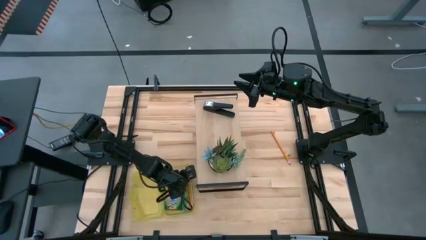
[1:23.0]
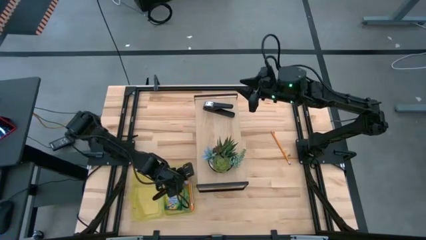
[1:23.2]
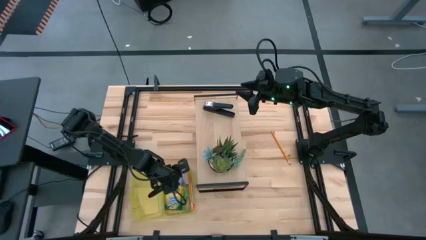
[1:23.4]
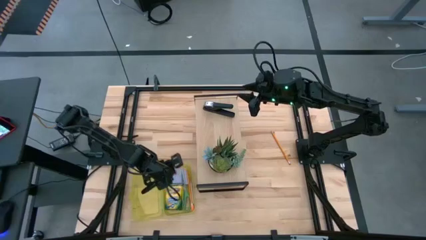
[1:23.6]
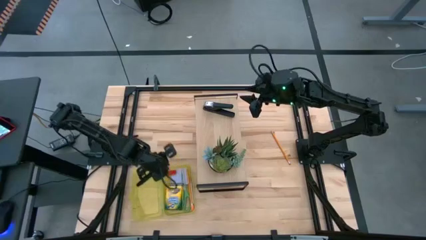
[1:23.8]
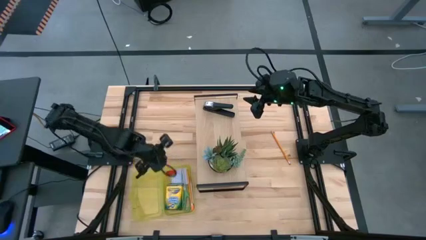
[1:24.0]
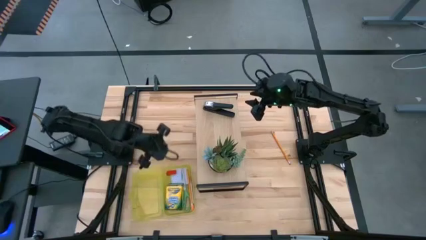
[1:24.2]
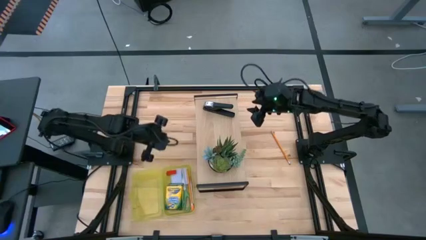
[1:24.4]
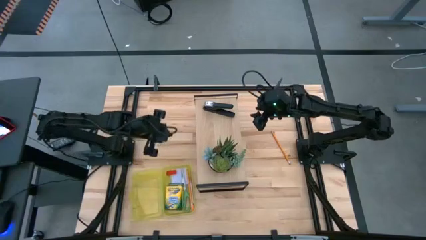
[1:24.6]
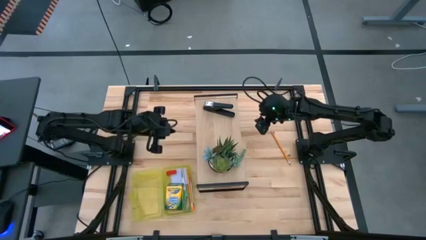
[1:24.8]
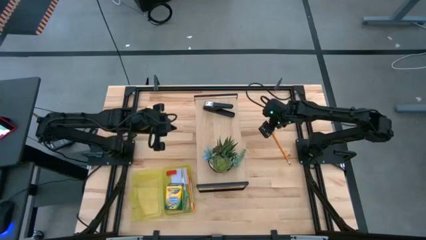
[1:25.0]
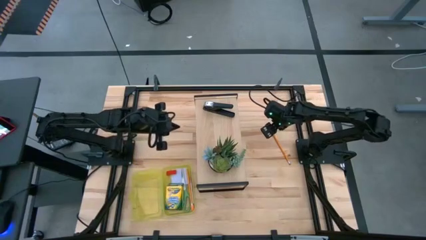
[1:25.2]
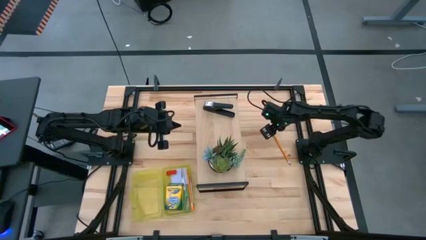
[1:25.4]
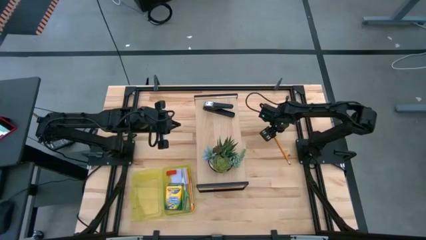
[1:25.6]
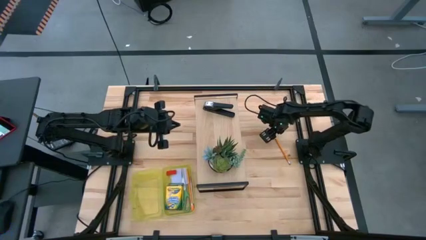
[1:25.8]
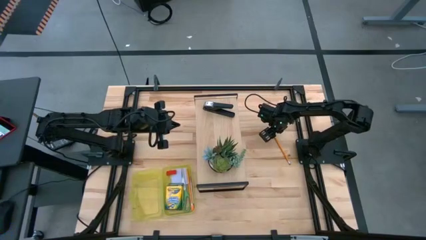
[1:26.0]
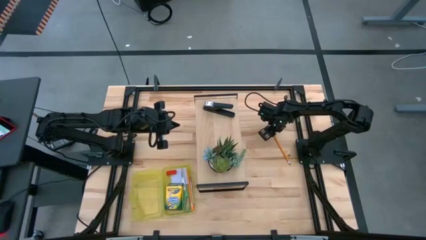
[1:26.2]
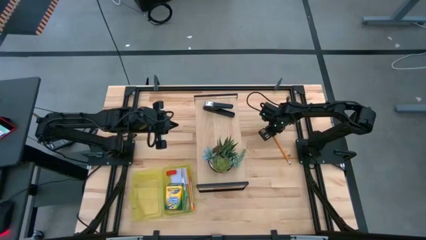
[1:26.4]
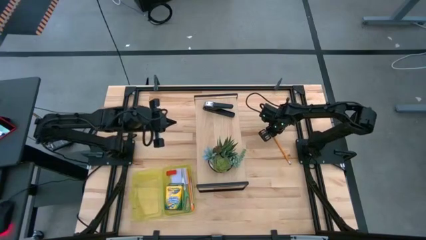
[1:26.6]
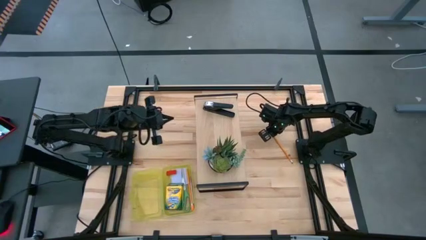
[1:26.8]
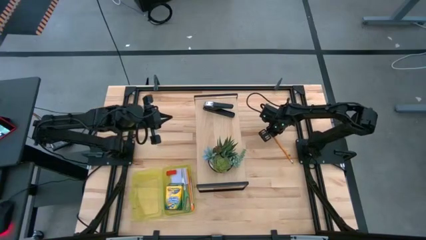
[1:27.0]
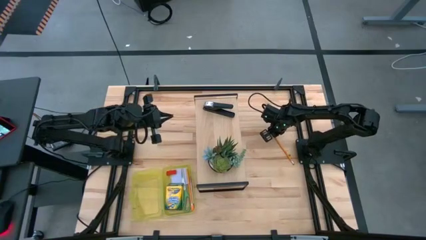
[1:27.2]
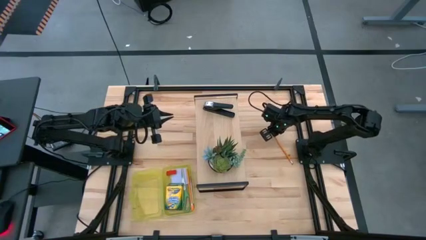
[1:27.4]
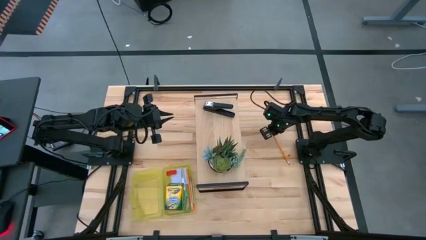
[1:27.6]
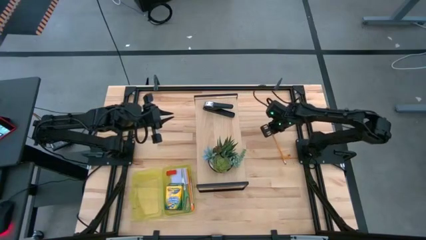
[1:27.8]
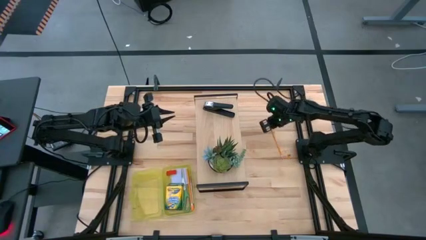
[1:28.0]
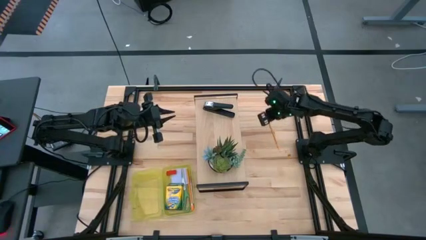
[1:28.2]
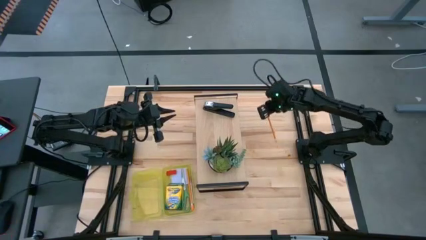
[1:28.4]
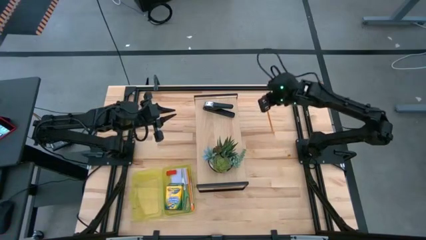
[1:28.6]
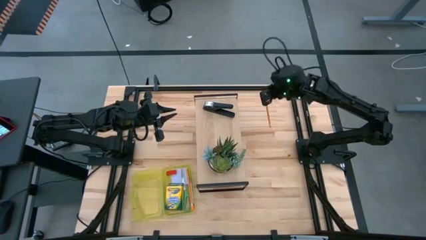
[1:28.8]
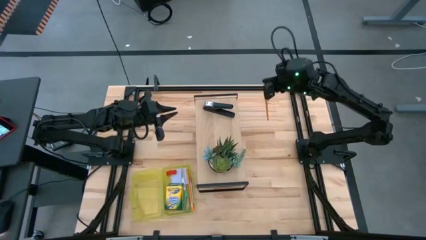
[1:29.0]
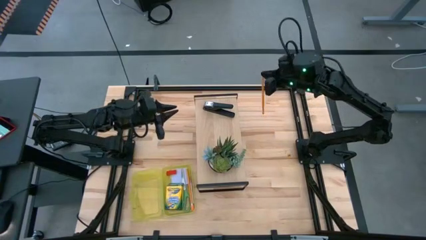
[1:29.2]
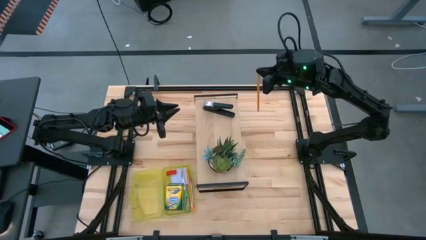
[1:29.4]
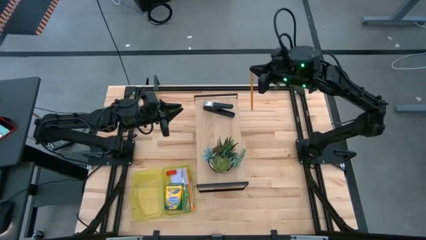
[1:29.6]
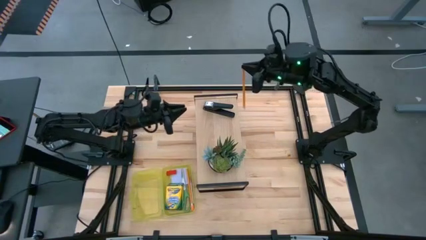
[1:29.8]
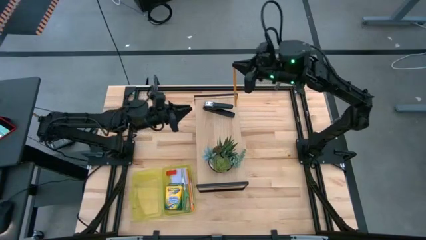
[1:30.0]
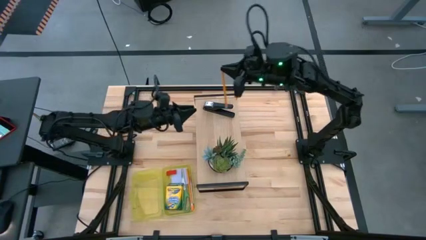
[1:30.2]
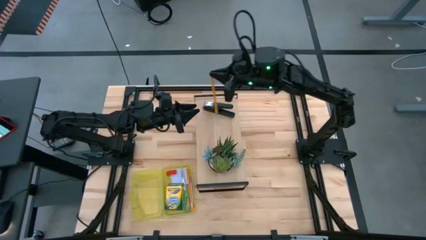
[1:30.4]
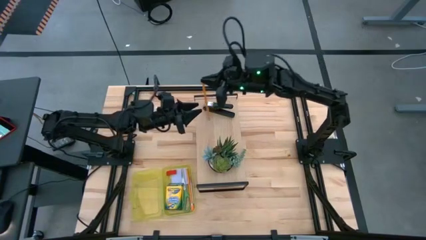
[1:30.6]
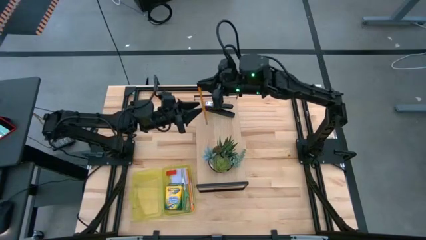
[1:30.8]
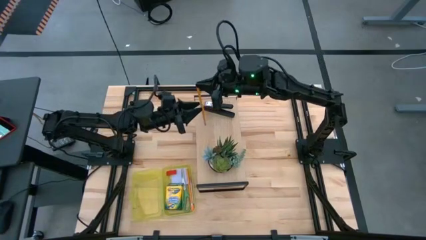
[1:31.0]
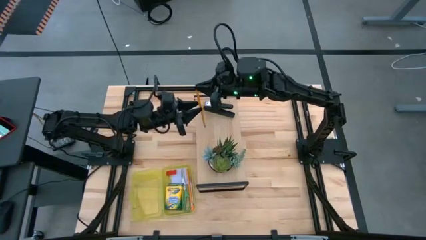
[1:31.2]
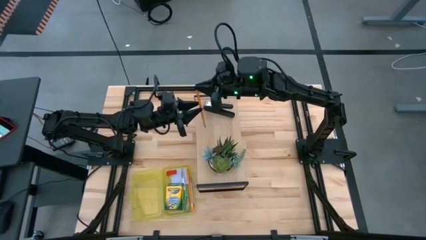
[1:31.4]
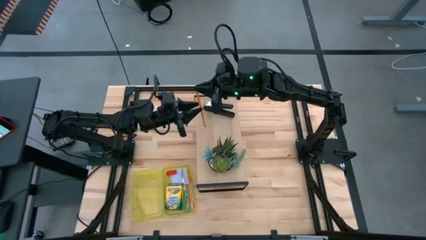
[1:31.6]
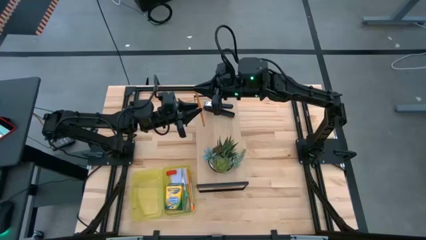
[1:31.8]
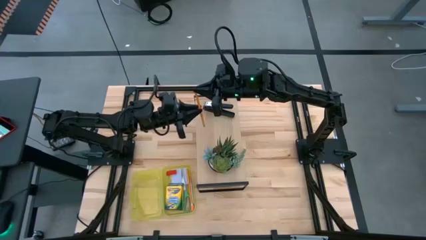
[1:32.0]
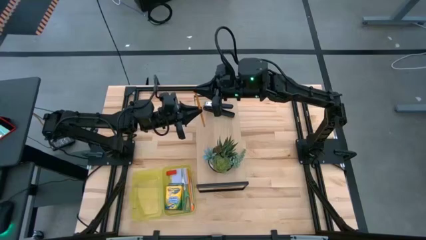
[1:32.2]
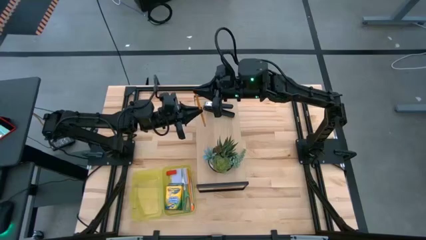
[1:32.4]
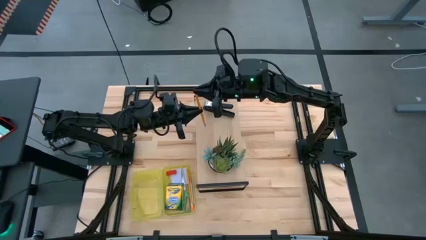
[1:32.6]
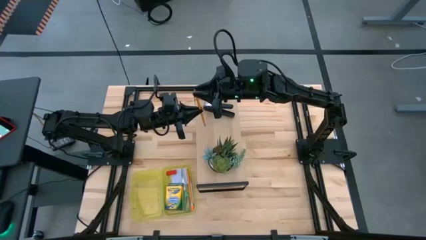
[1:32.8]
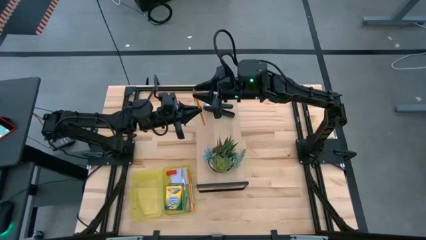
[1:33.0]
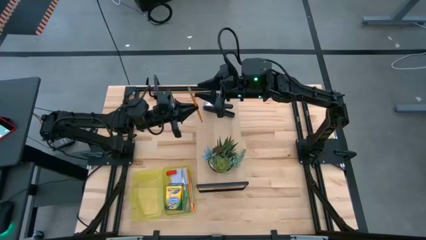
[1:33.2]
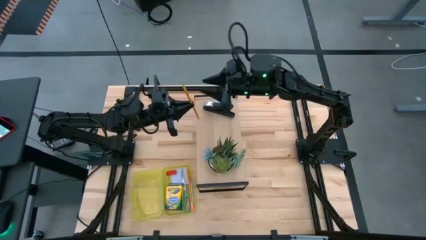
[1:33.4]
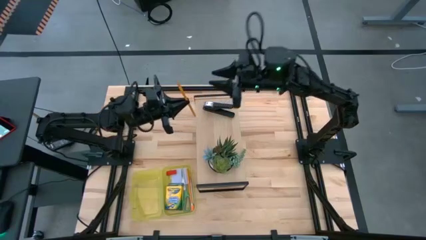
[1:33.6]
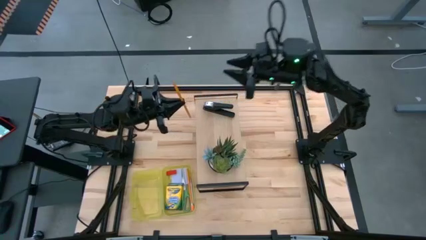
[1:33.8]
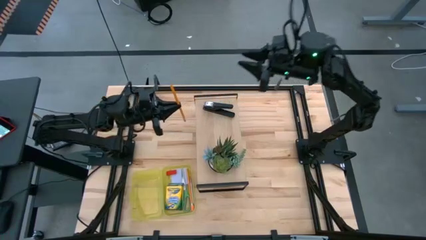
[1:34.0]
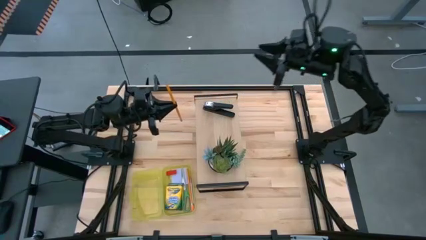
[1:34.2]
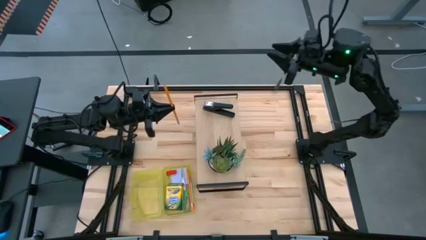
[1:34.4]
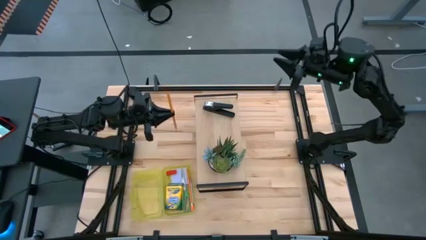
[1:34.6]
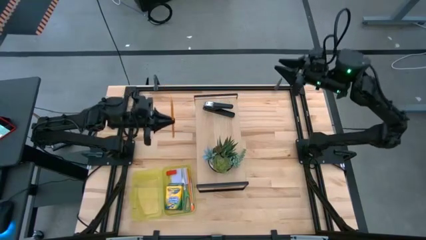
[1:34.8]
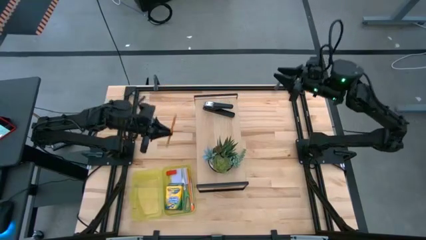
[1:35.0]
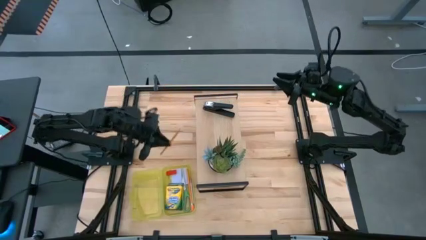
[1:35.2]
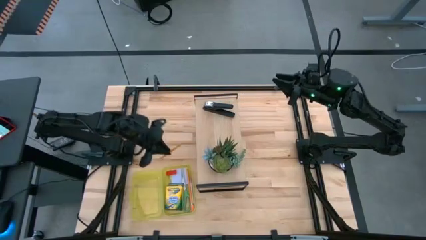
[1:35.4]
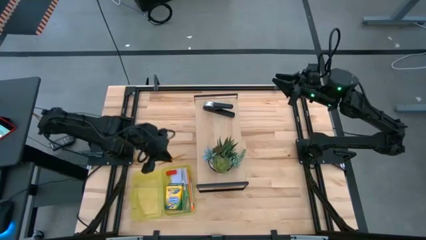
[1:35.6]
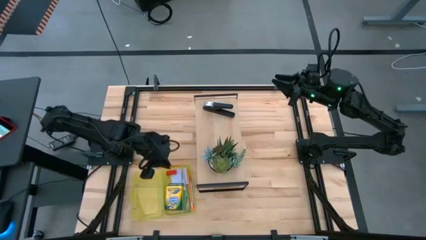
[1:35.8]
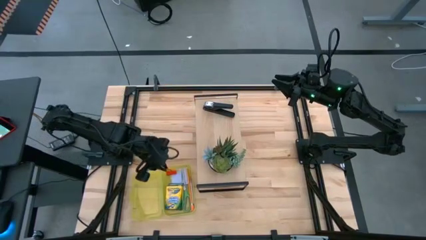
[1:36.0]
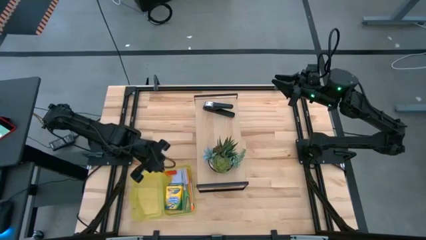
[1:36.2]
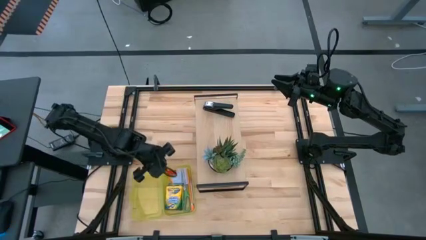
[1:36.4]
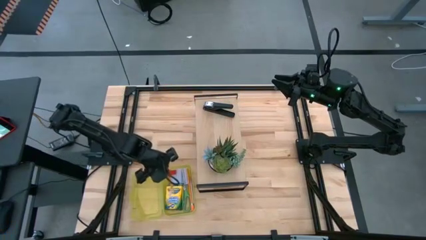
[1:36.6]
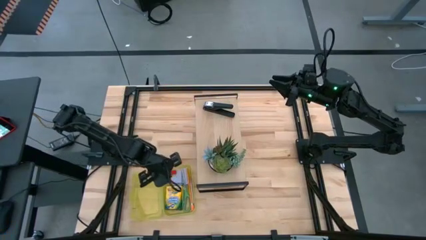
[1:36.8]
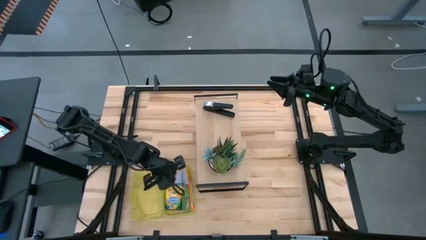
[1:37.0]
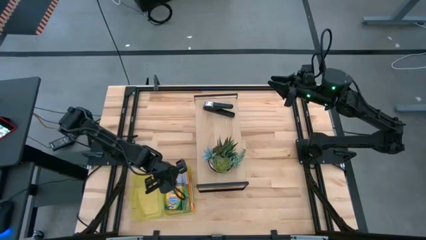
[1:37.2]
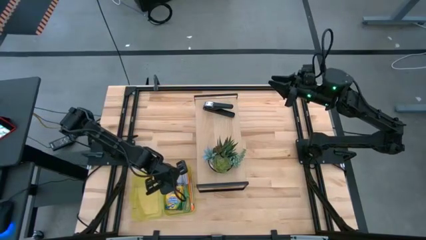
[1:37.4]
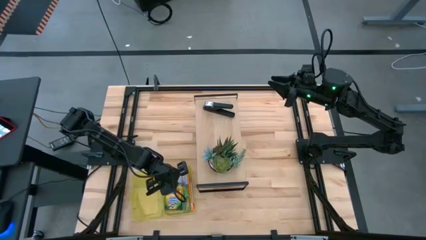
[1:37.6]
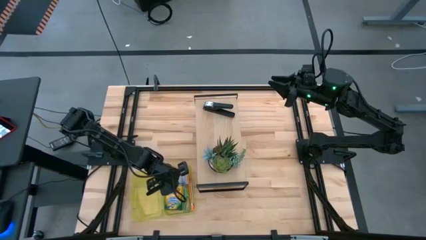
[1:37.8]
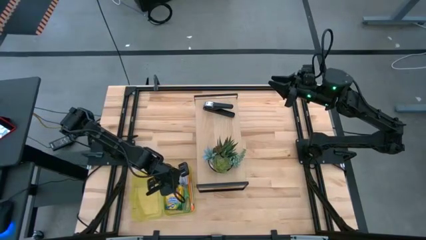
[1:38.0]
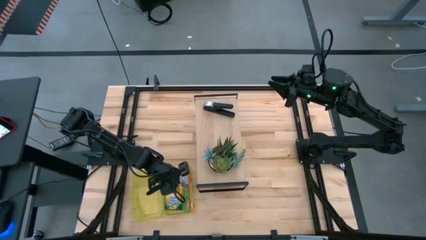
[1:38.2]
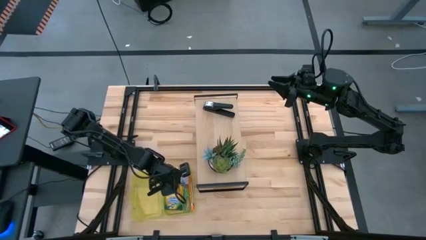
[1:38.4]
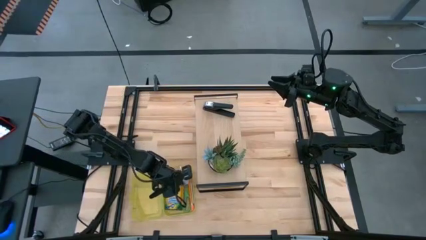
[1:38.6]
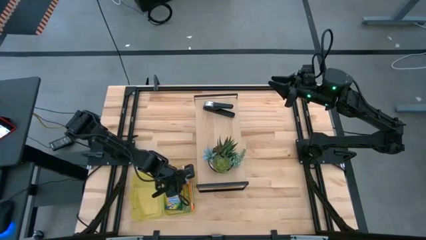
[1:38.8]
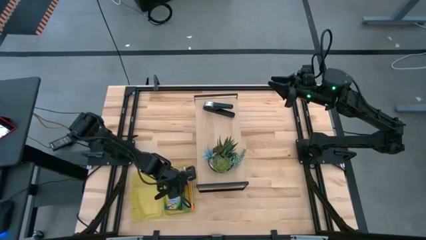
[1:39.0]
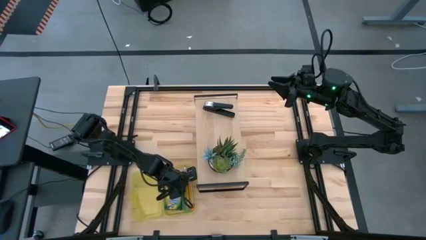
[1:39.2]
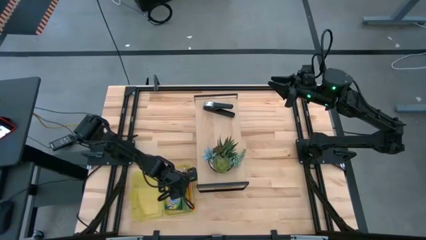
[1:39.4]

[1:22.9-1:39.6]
Task: Pack school essentials
Put the yellow pencil into the yellow supply box

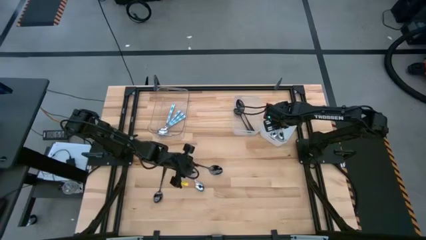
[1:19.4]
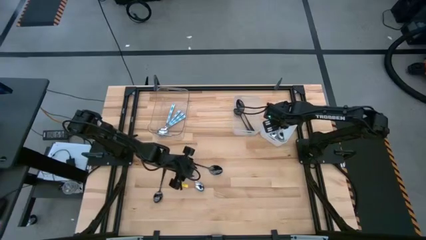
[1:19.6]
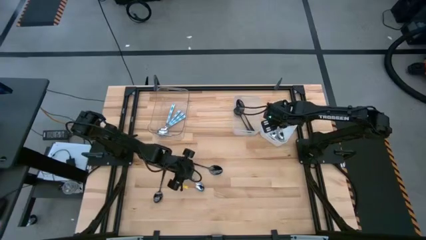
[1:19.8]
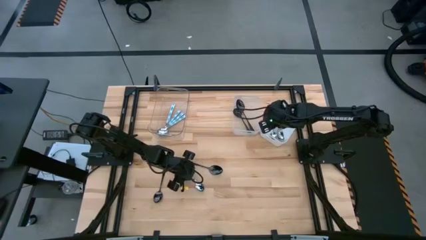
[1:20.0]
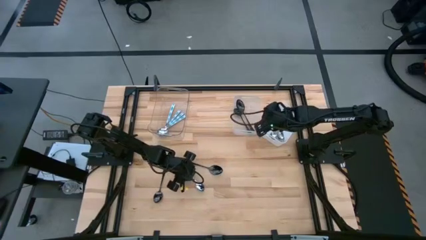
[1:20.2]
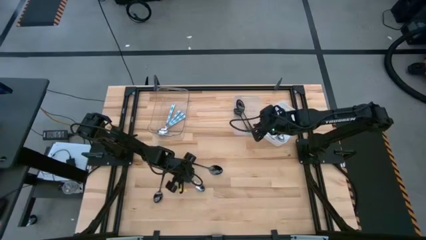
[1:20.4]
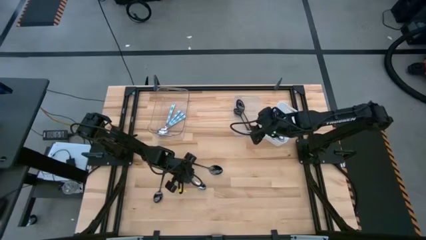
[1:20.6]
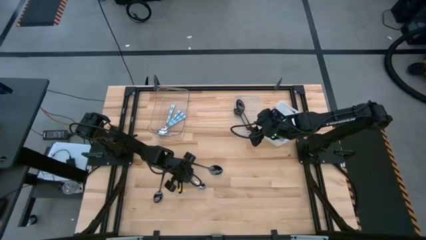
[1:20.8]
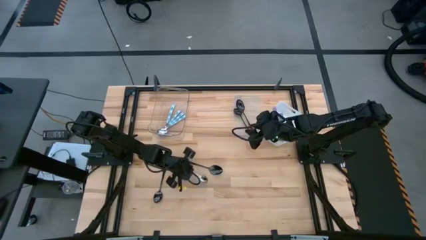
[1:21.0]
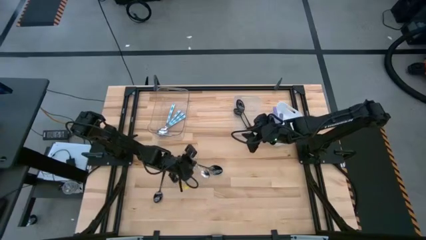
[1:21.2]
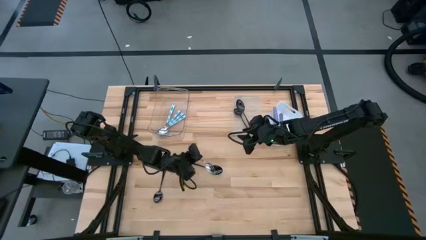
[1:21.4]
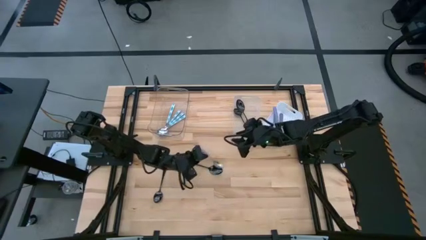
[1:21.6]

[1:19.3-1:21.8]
Task: Sort silverware by color (type)
Put the purple spoon into the white bin
